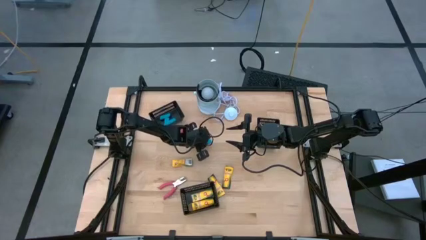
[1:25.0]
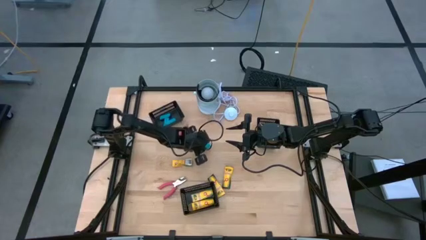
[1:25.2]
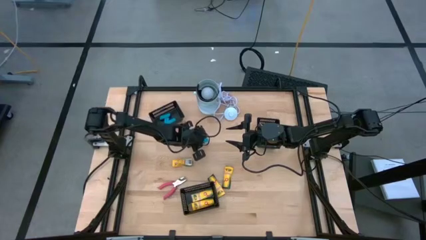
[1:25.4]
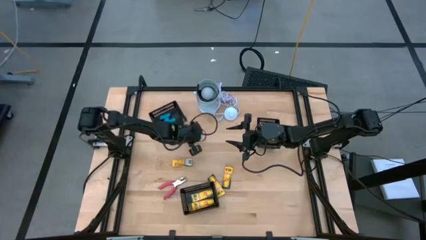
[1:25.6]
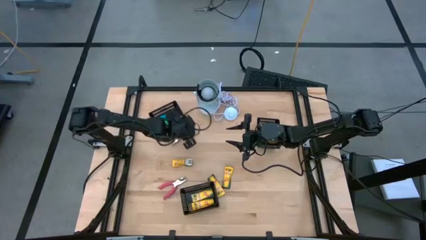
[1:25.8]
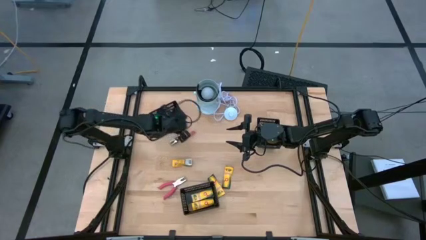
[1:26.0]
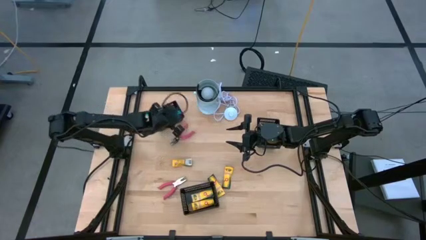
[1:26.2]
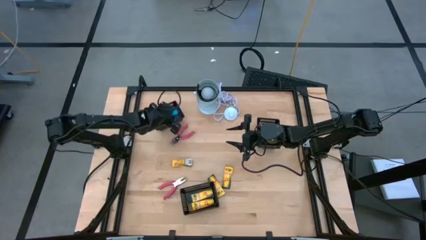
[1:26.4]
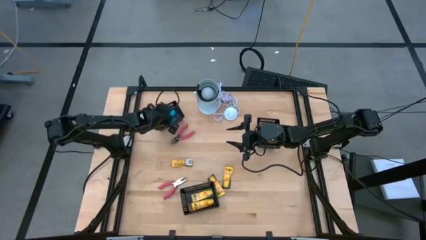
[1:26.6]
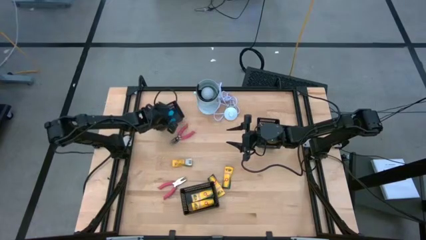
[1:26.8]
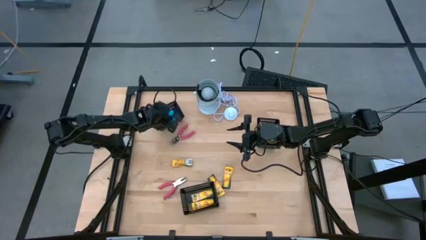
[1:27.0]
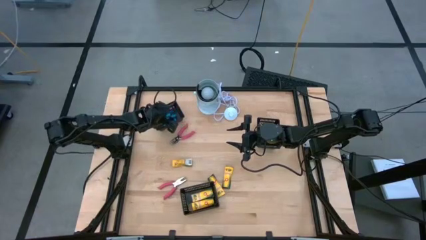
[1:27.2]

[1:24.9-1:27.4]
Task: Pick & Place School Supplies
Put the blue eraser into the top black bin

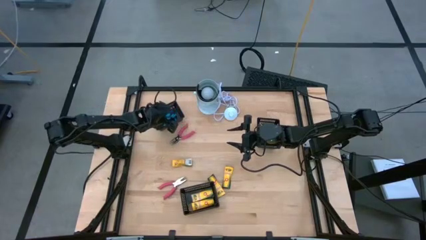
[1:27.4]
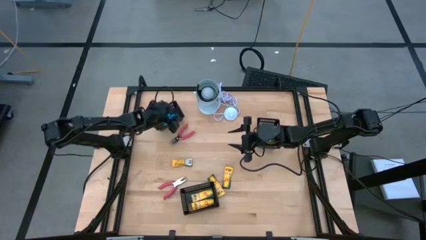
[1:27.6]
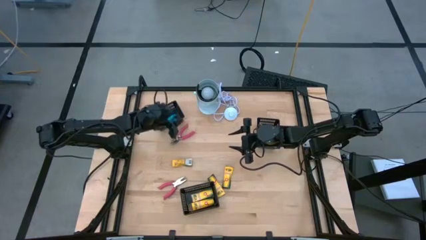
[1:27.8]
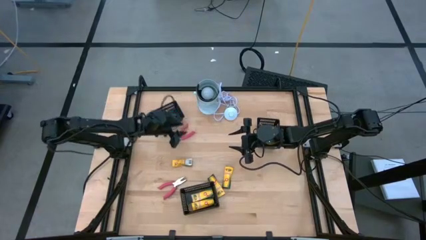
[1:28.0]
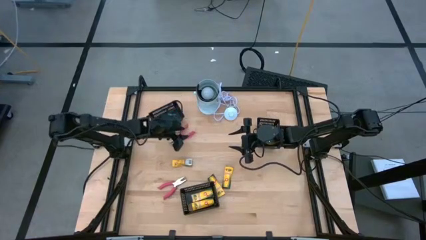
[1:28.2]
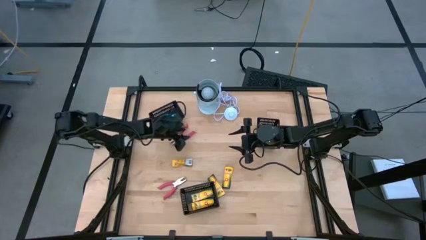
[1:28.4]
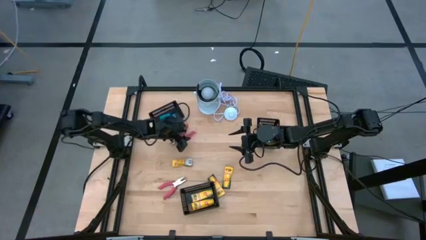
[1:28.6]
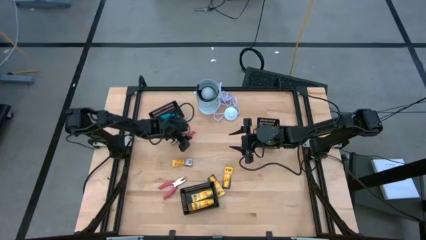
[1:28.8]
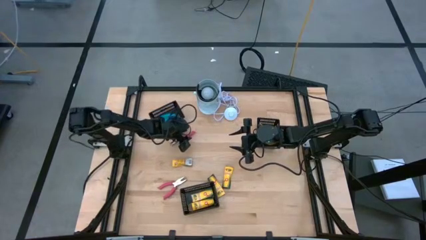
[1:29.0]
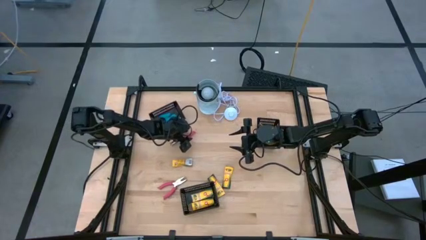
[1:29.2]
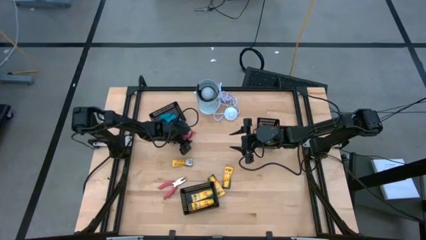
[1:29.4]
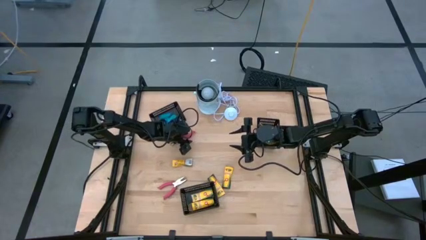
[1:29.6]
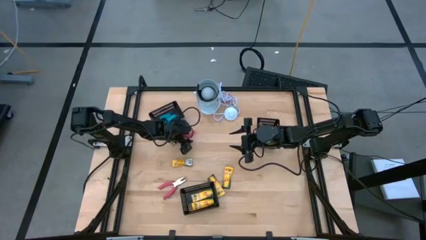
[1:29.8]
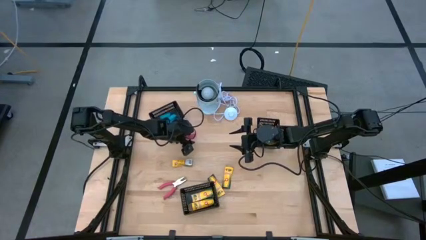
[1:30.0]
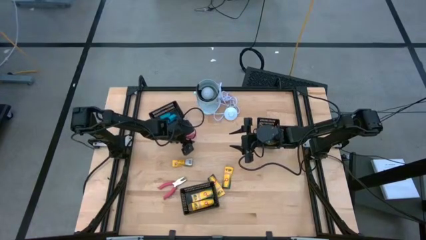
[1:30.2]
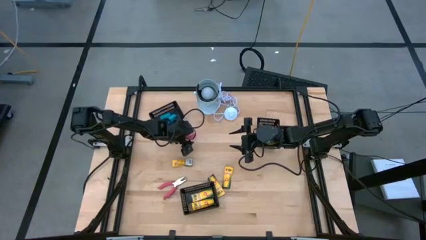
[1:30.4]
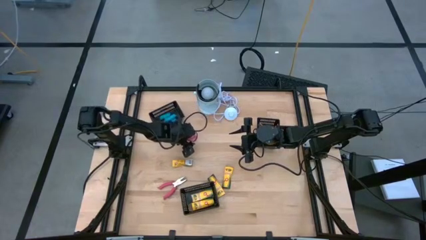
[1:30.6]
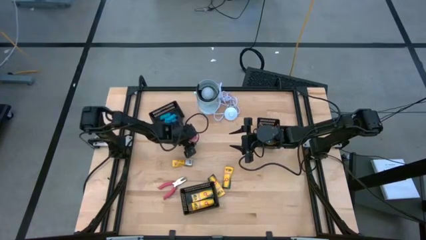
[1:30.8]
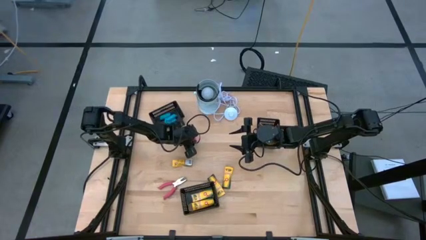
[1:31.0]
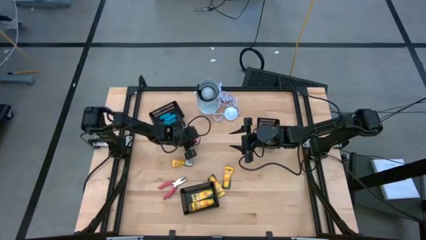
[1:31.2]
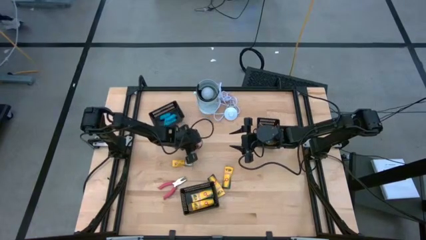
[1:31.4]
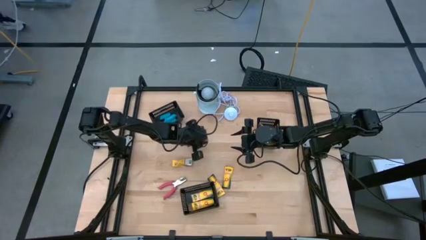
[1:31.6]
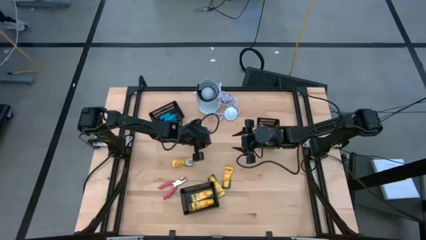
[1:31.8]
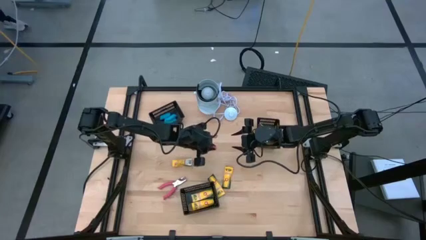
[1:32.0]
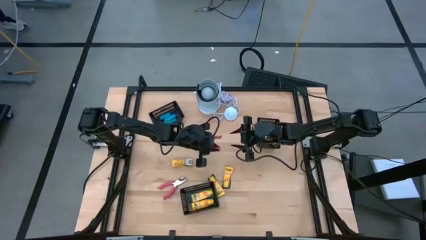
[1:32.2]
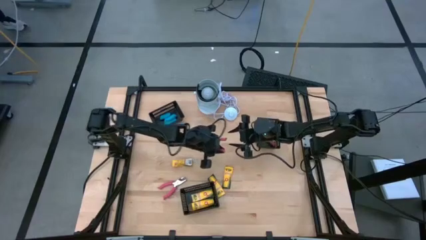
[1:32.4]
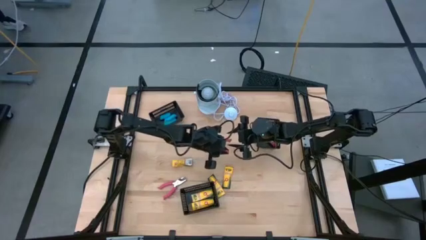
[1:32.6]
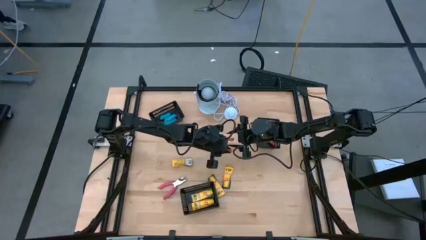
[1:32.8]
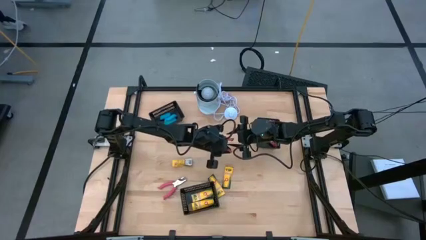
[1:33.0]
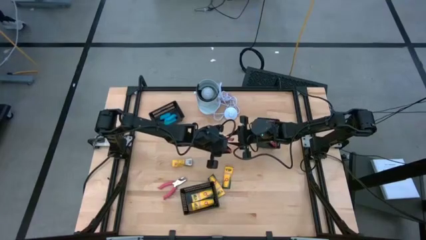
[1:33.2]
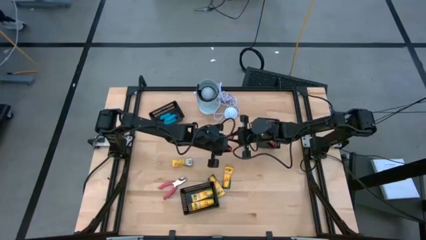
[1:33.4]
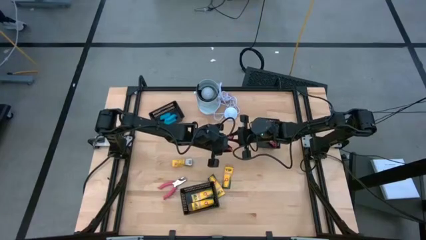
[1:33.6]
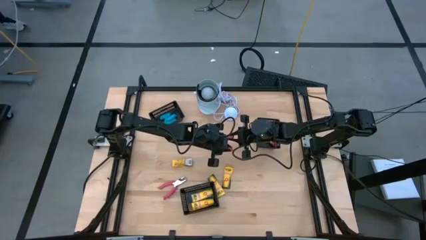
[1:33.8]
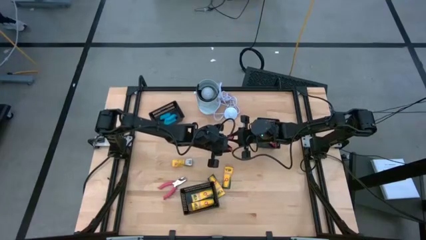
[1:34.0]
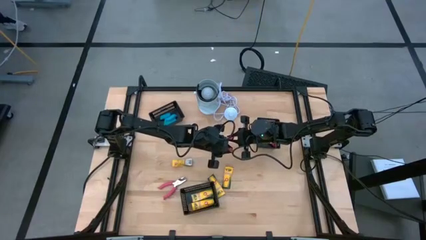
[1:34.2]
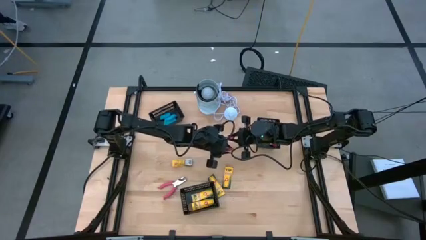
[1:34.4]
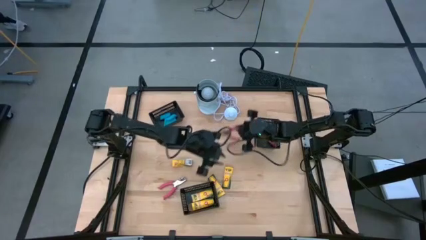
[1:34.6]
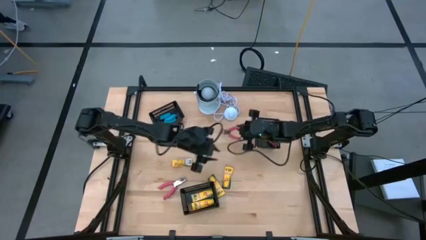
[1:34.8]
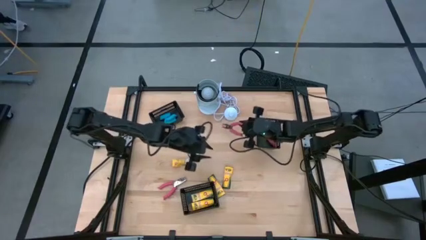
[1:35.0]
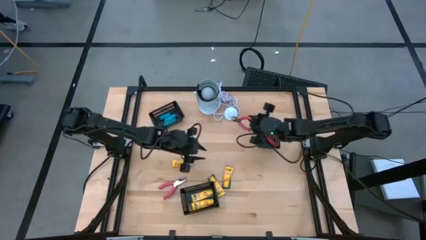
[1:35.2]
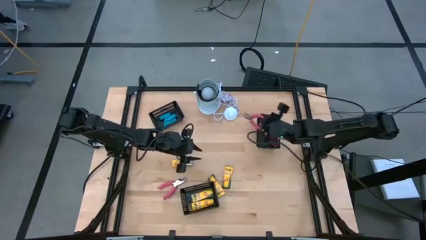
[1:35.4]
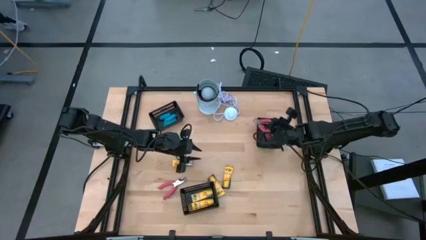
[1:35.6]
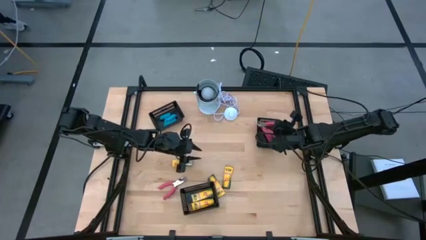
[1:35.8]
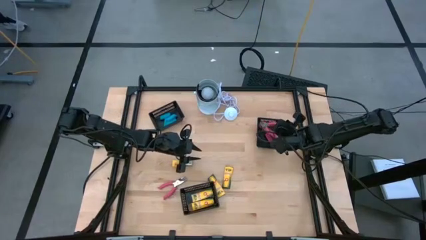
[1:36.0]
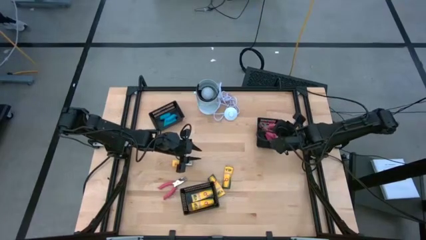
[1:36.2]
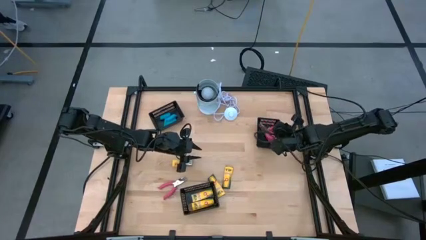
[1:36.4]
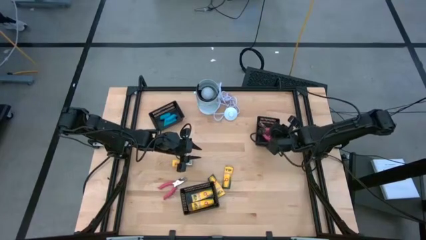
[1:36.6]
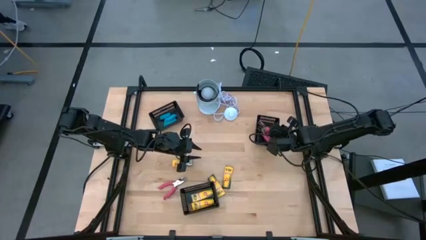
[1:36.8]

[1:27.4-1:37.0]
Put the pink puncher into the right black bin
